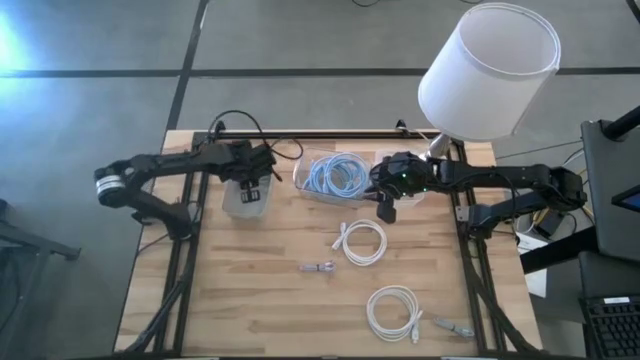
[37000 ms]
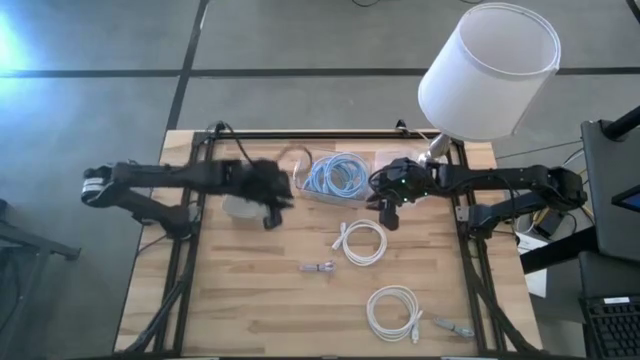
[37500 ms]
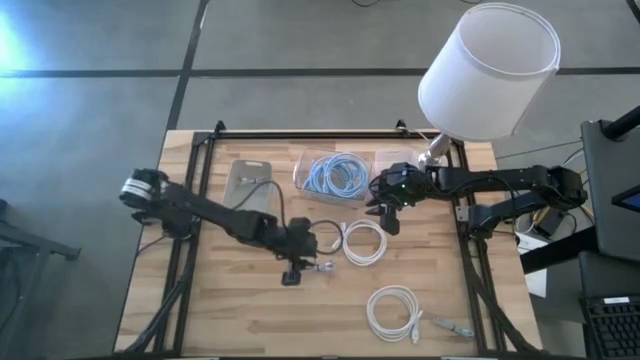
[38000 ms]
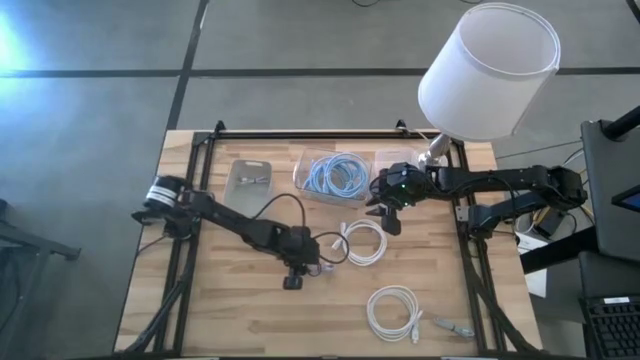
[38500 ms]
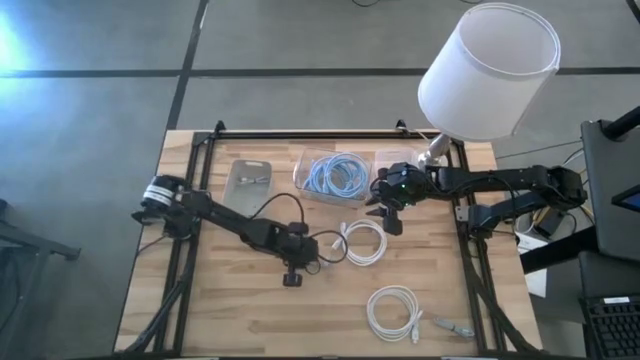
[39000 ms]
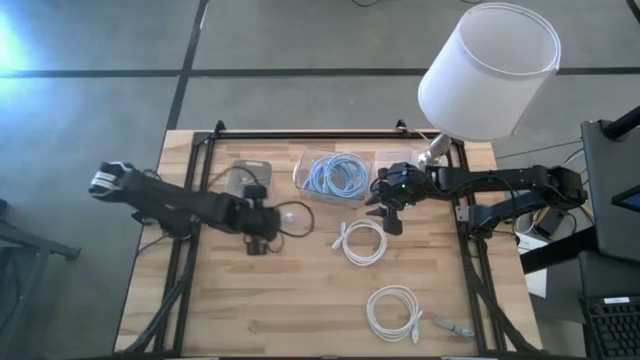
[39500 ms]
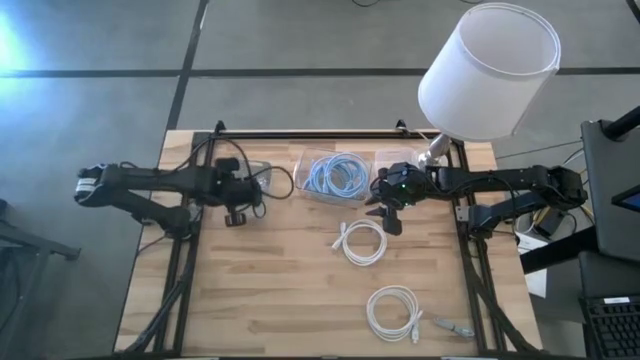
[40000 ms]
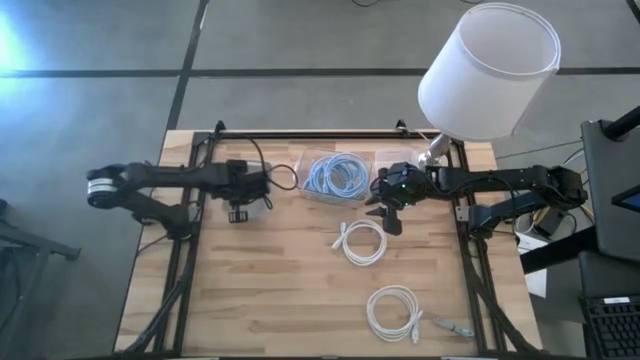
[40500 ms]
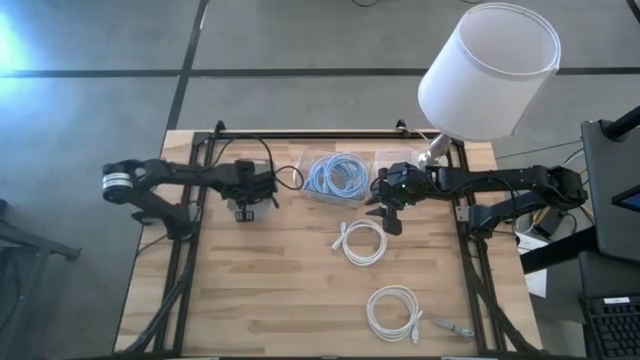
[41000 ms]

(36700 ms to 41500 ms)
Task: Pick & Place USB Port
Put the purple USB cable into the gray bin

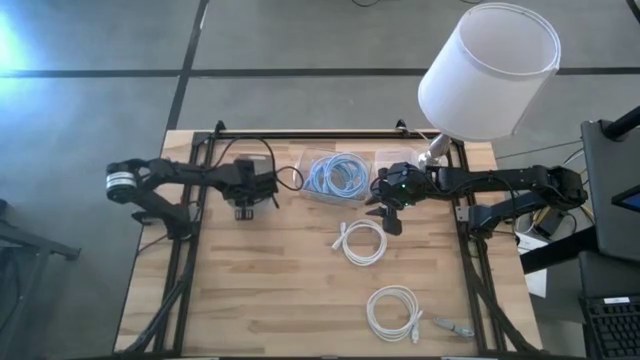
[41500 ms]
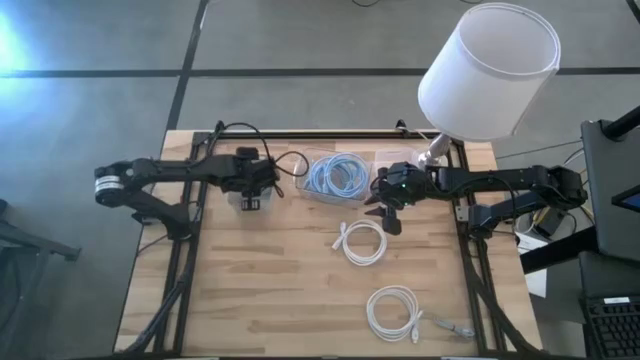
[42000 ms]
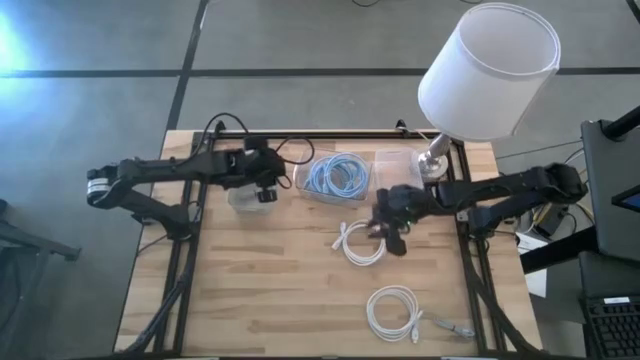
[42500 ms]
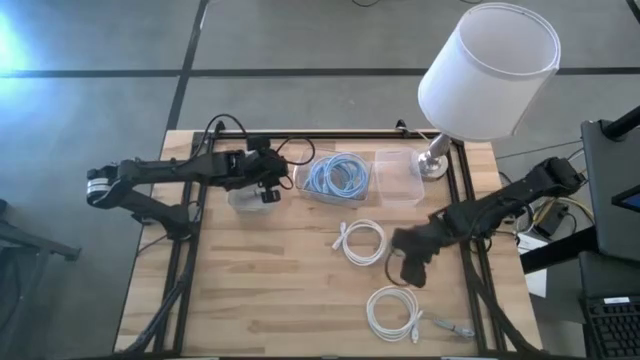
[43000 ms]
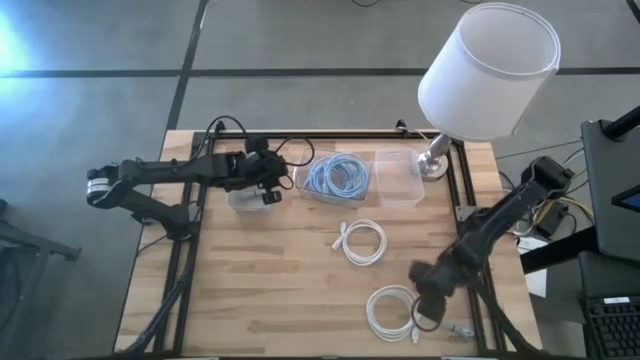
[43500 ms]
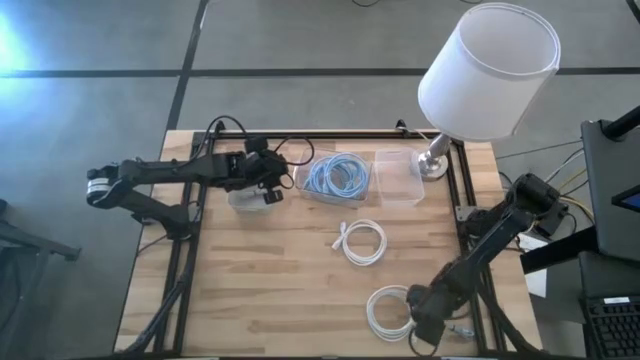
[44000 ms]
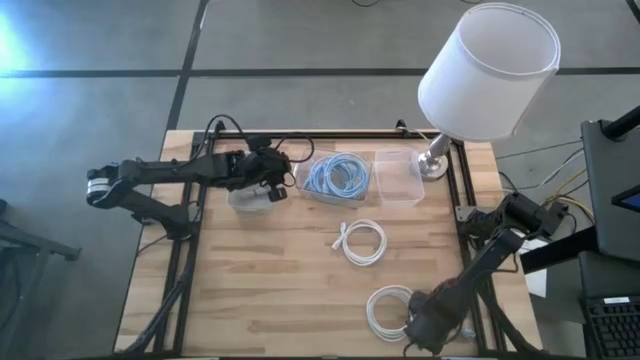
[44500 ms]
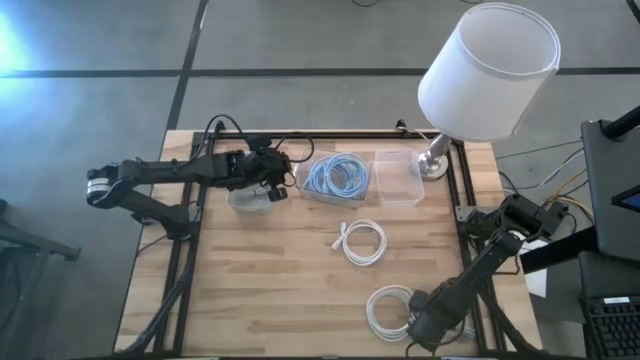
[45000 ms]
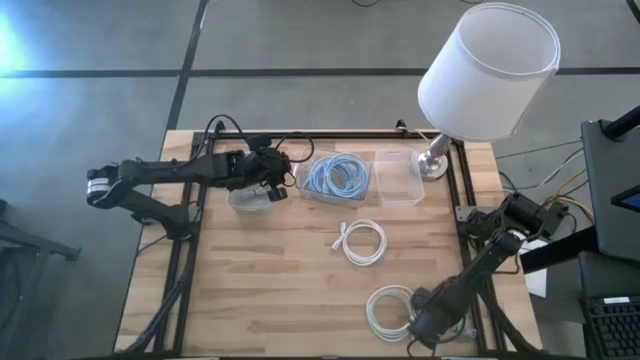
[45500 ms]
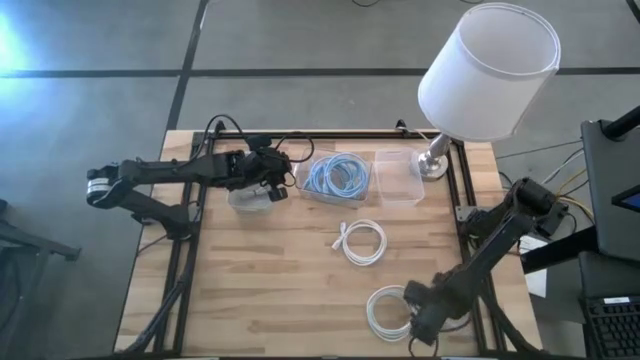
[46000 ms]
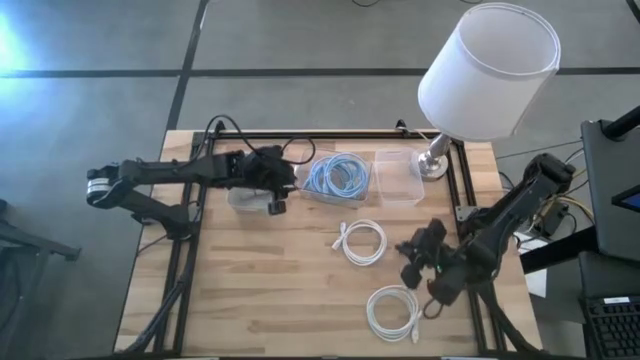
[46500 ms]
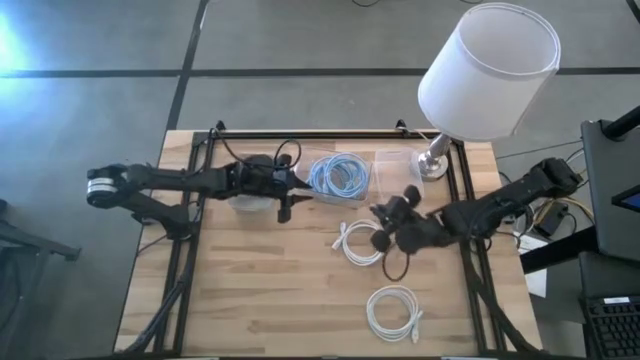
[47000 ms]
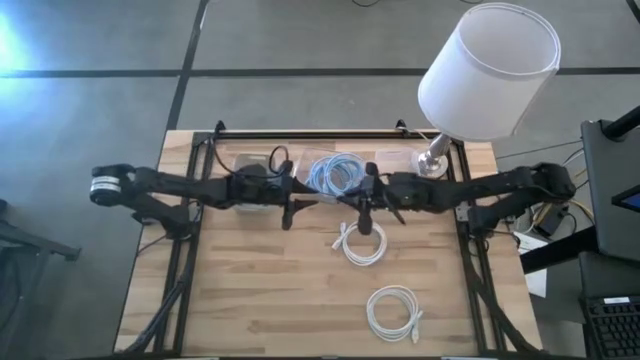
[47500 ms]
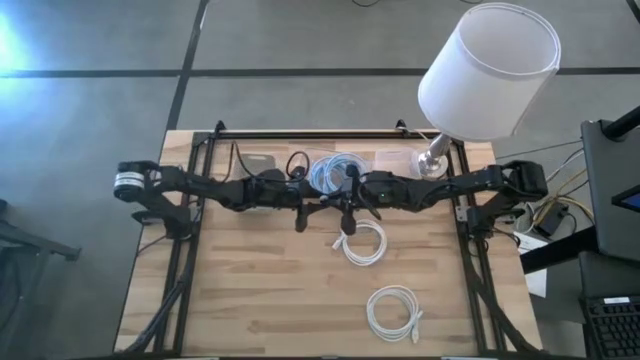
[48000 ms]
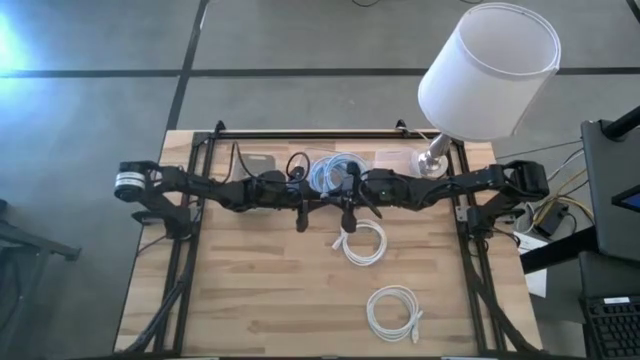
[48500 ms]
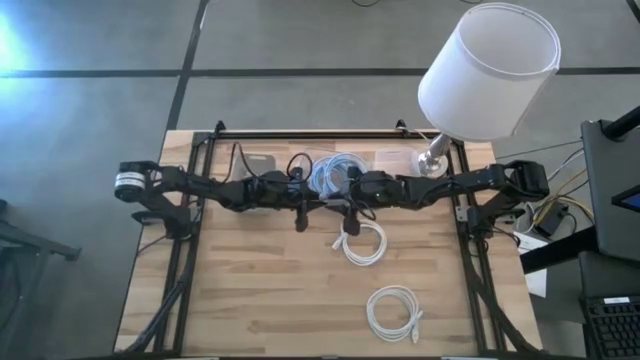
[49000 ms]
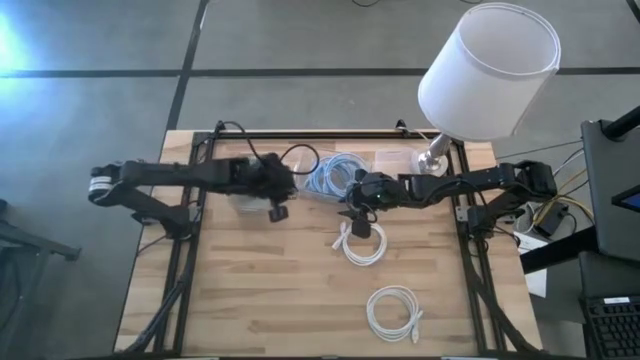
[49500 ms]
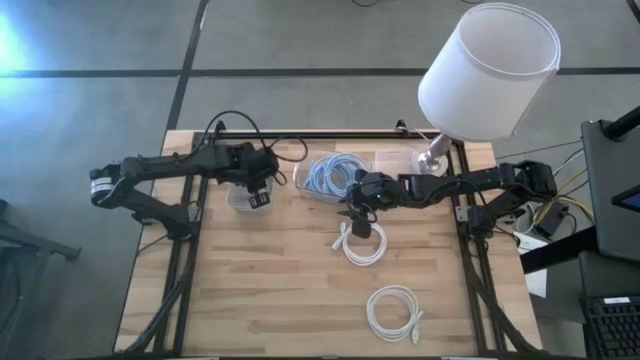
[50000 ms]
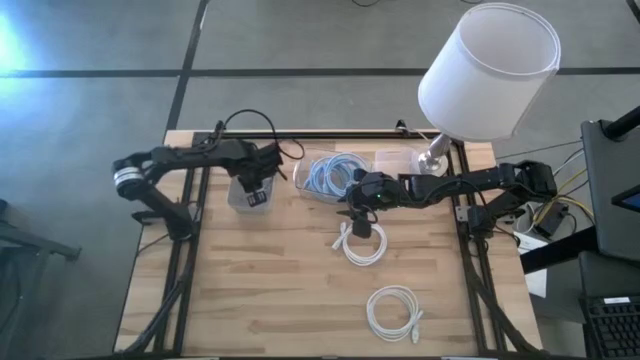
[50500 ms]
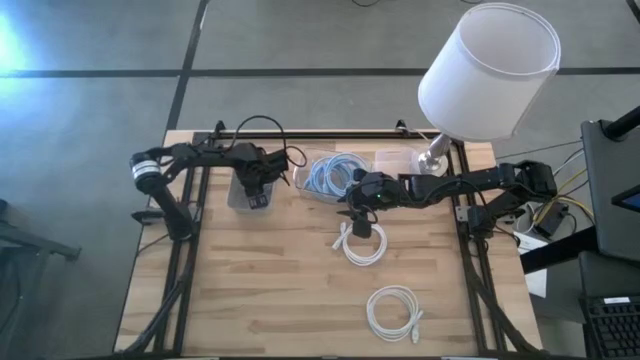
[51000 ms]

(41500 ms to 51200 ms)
Put the blue USB cable into the gray bin

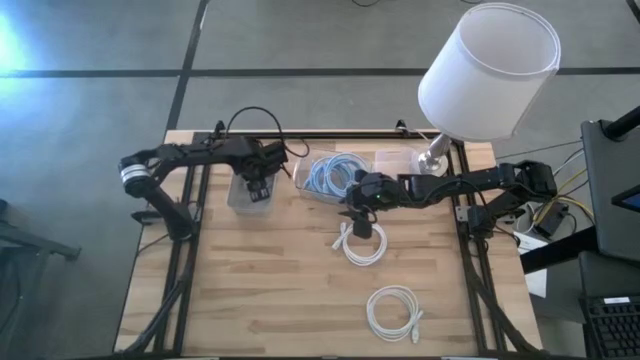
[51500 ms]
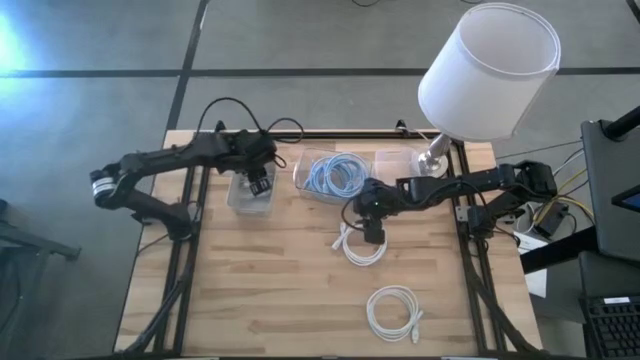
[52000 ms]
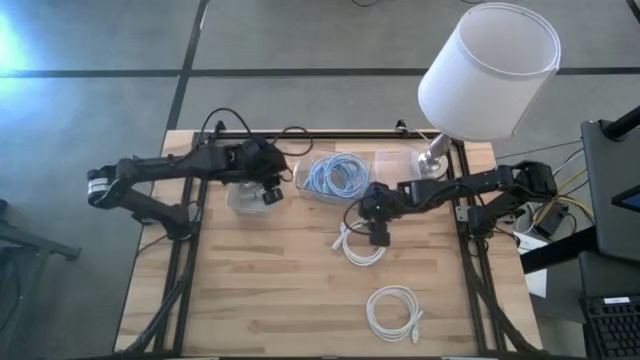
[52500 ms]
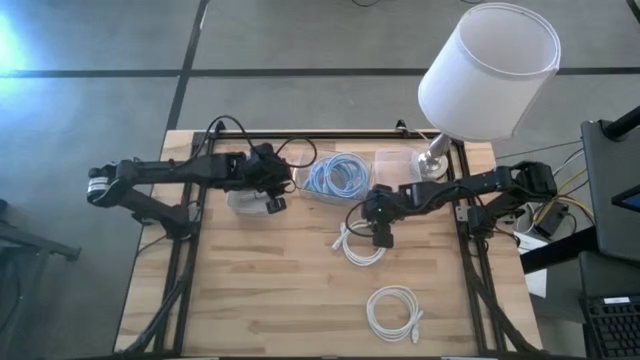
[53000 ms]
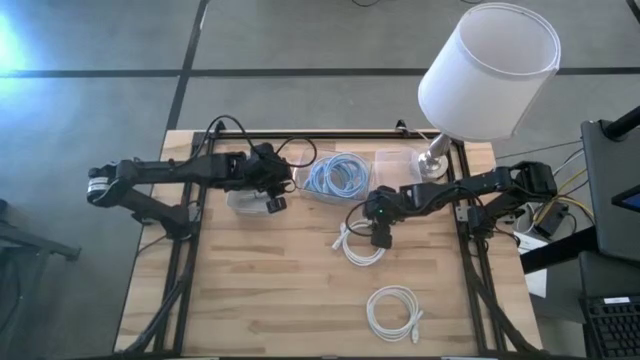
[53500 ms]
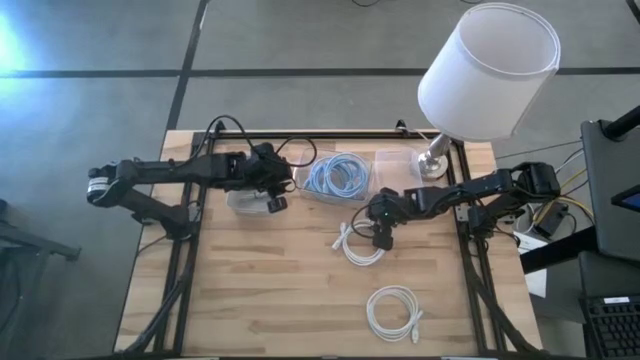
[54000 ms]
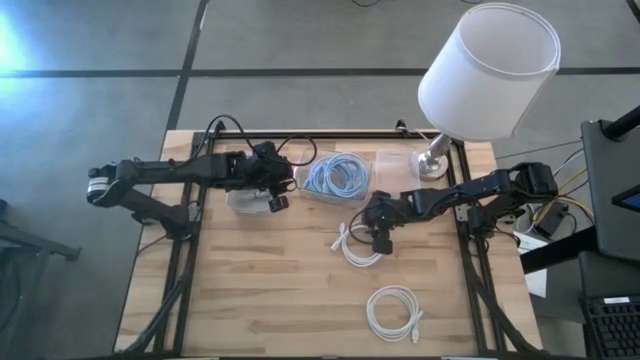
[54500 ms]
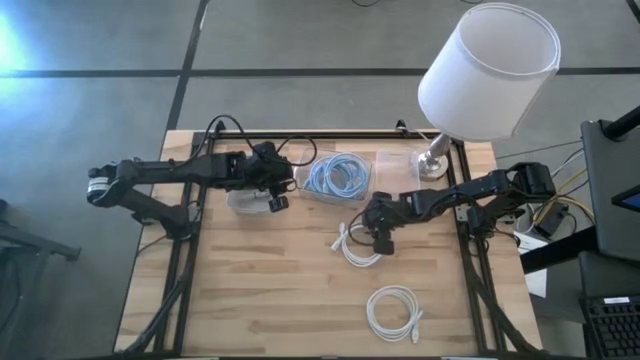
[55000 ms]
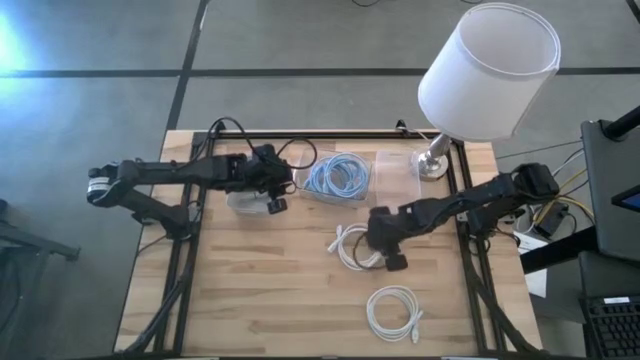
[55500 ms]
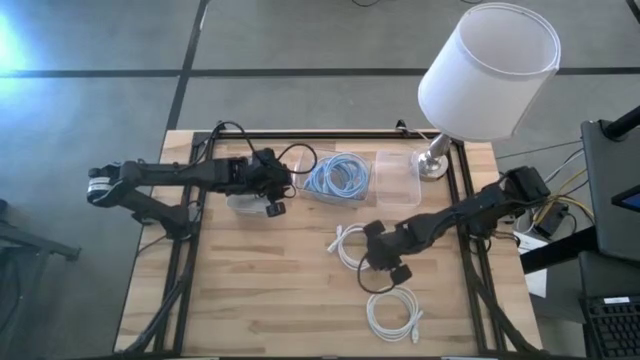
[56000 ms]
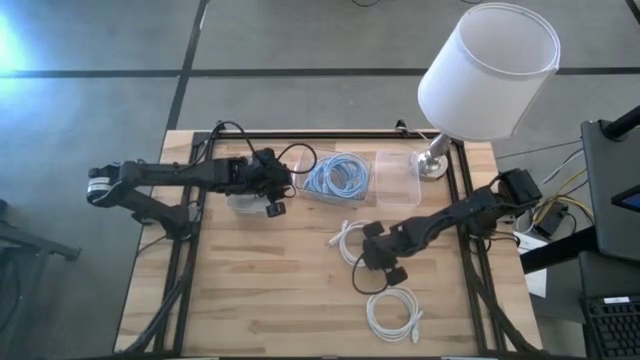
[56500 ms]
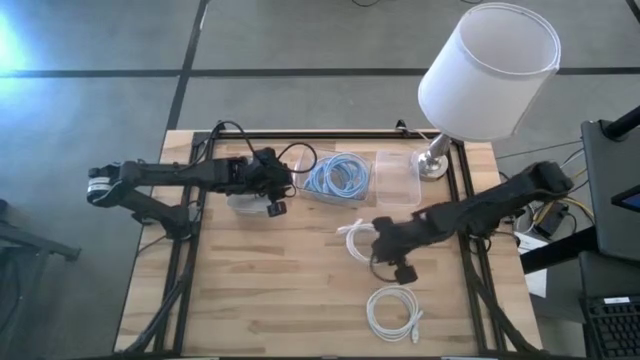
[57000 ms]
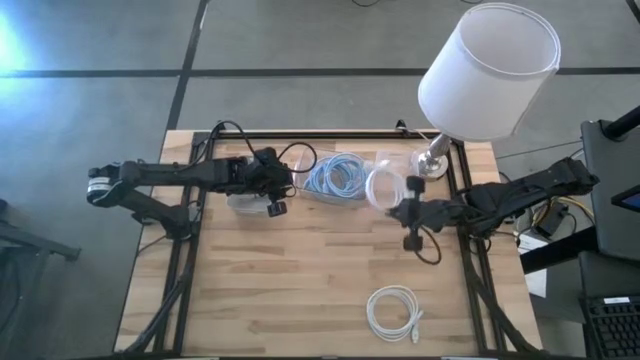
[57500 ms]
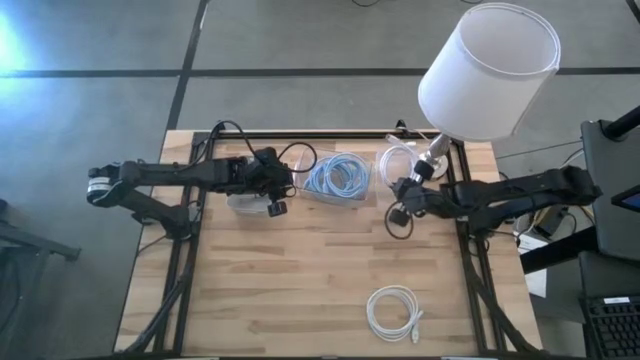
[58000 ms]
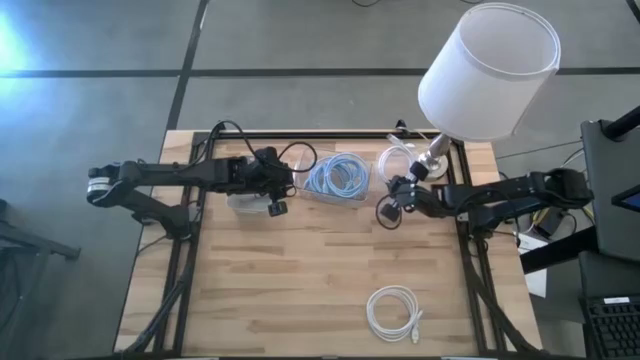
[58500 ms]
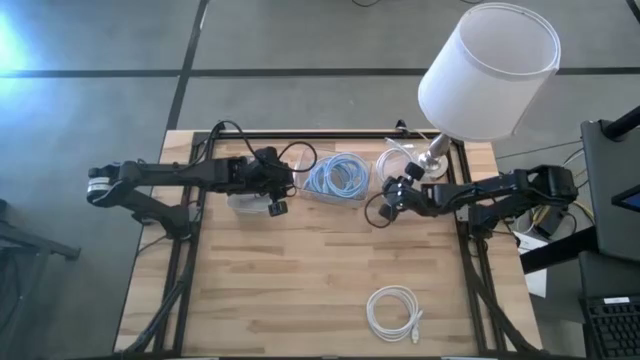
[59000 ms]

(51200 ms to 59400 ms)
Put the top white HDMI cable into the right transparent bin
